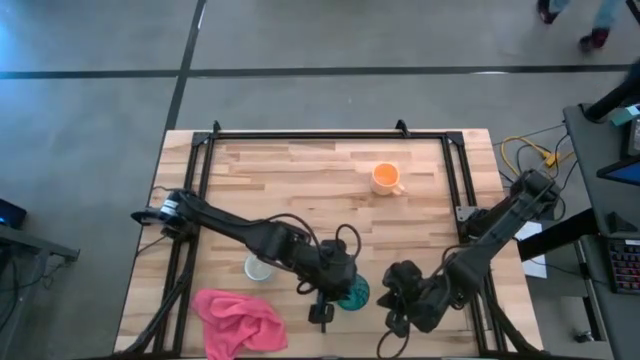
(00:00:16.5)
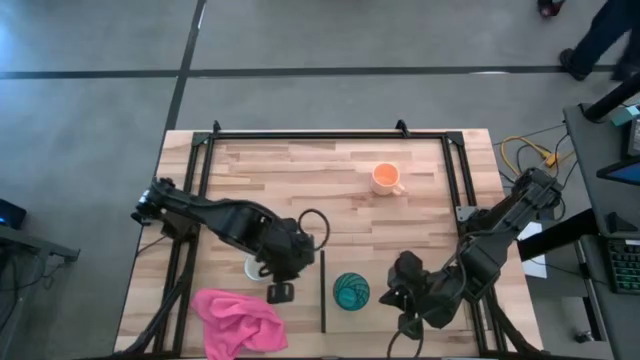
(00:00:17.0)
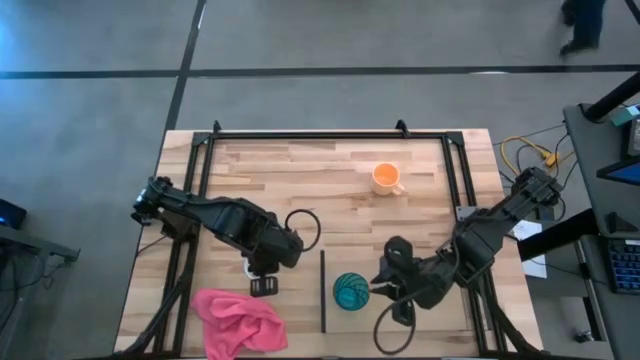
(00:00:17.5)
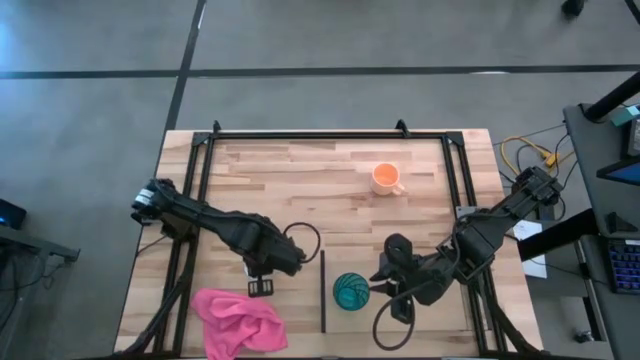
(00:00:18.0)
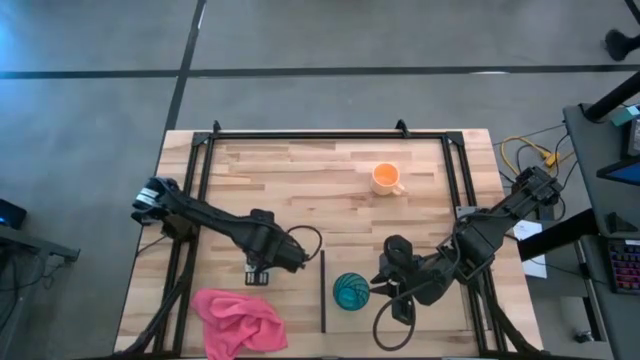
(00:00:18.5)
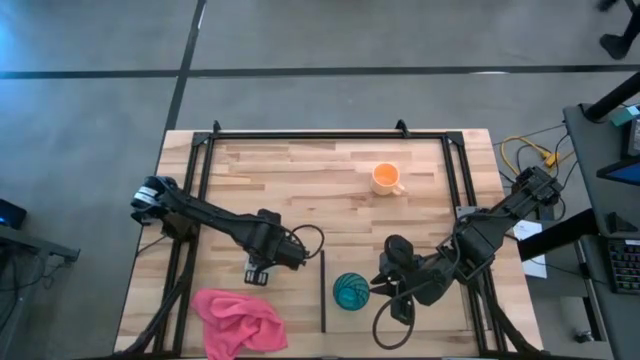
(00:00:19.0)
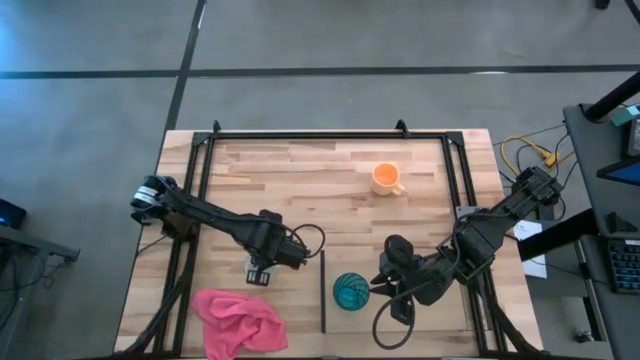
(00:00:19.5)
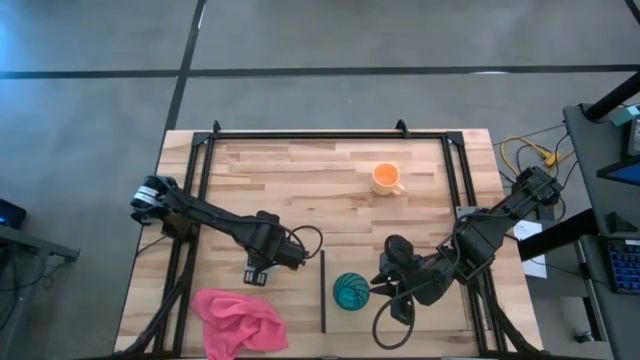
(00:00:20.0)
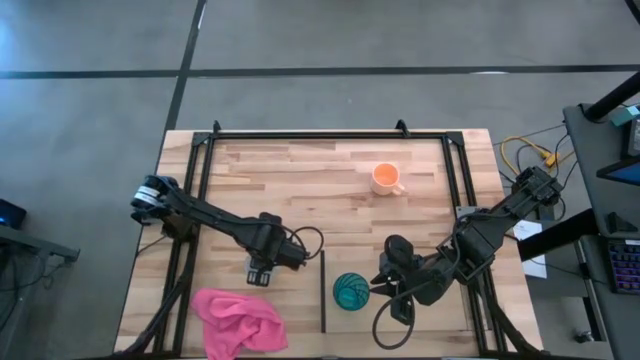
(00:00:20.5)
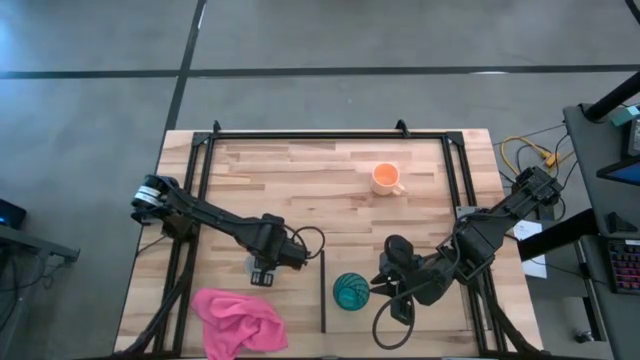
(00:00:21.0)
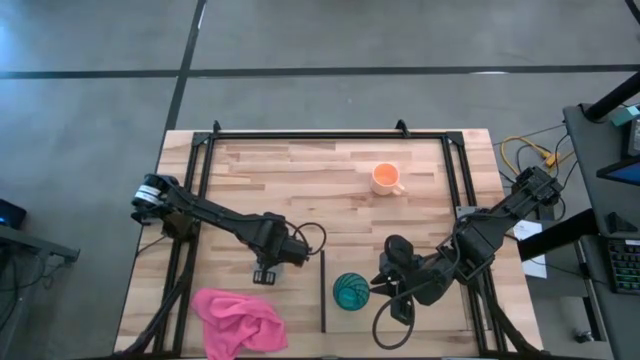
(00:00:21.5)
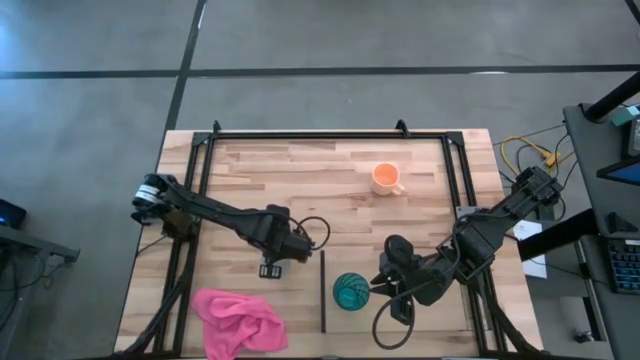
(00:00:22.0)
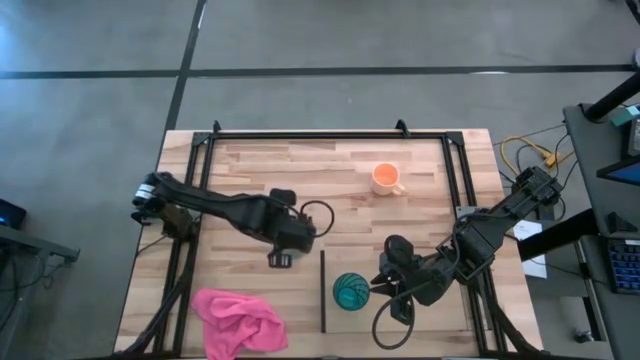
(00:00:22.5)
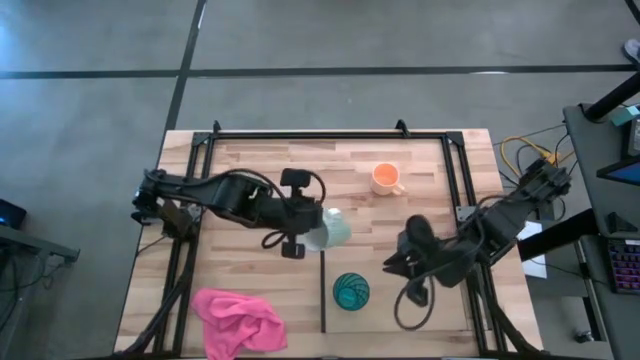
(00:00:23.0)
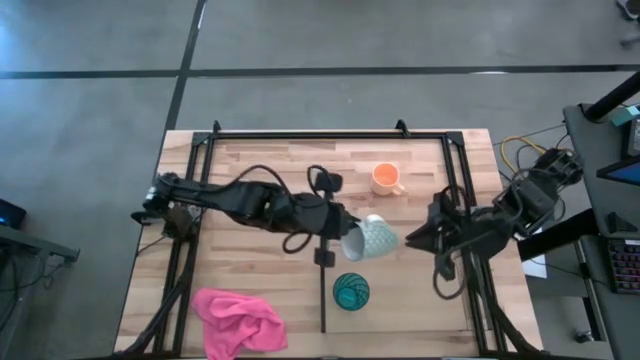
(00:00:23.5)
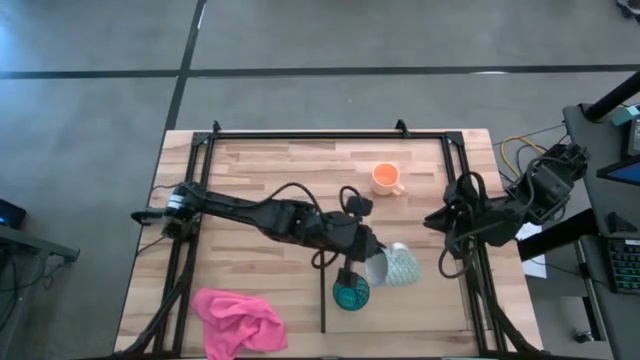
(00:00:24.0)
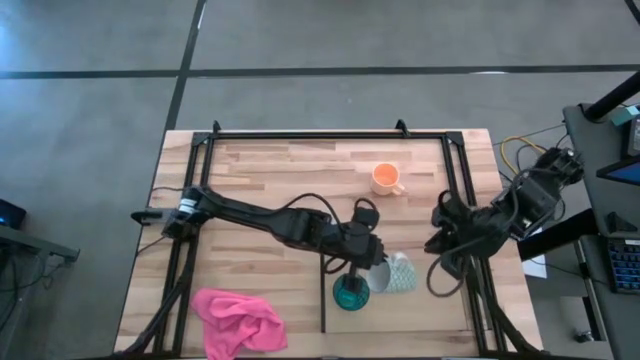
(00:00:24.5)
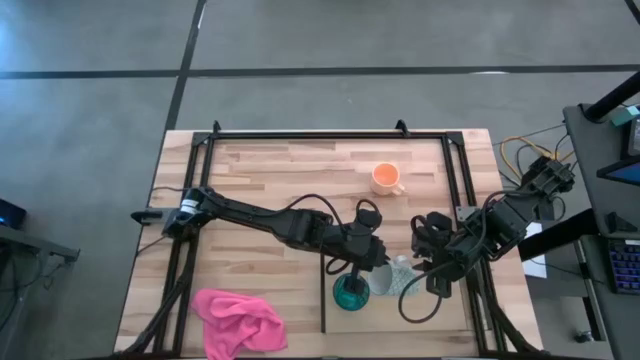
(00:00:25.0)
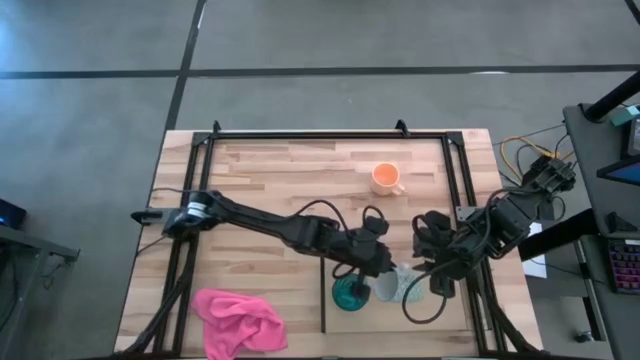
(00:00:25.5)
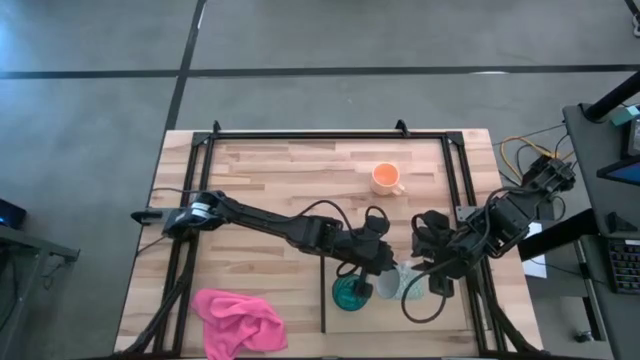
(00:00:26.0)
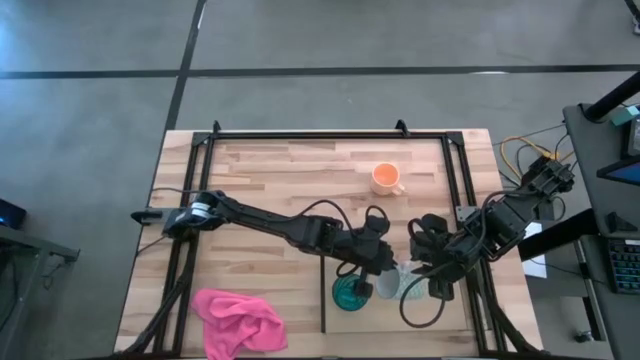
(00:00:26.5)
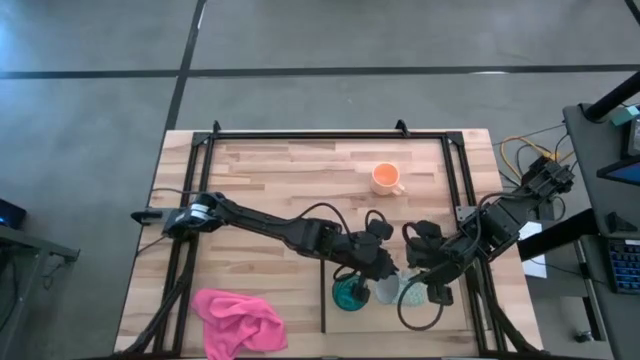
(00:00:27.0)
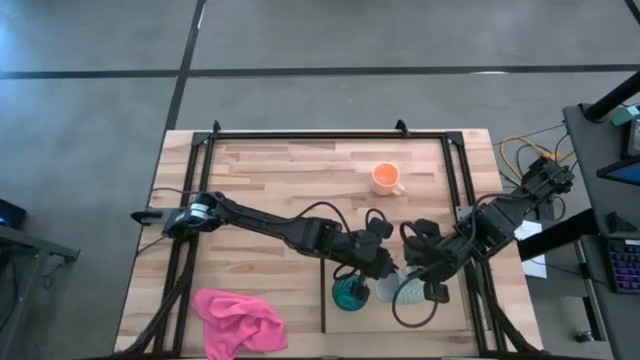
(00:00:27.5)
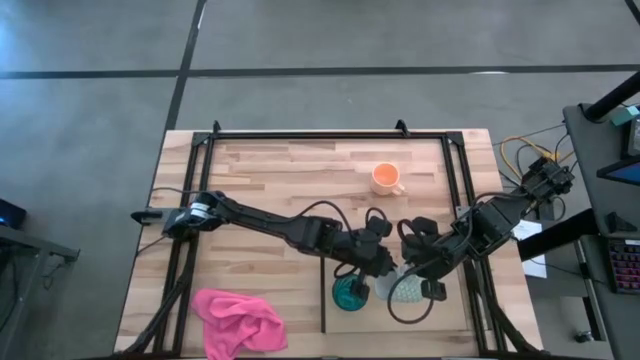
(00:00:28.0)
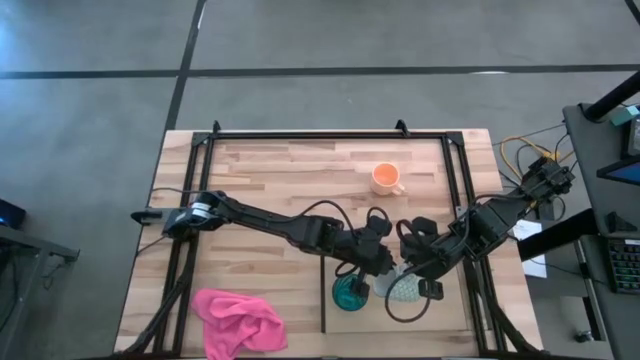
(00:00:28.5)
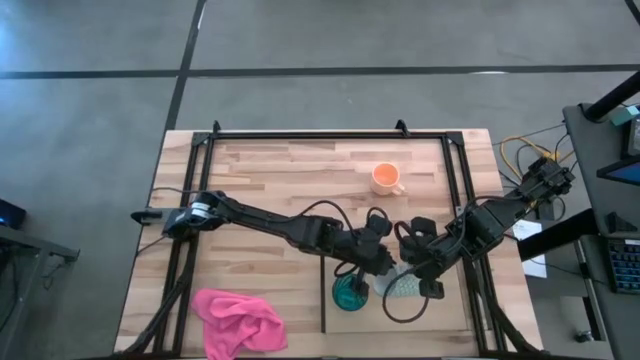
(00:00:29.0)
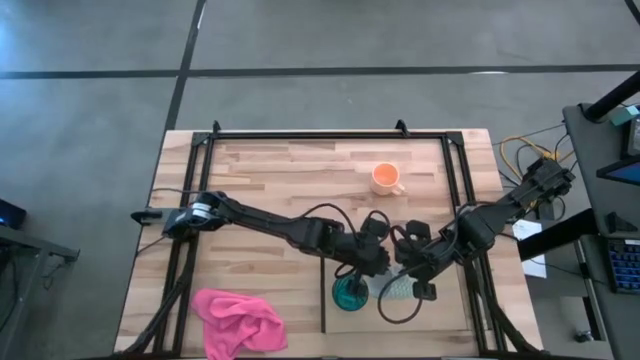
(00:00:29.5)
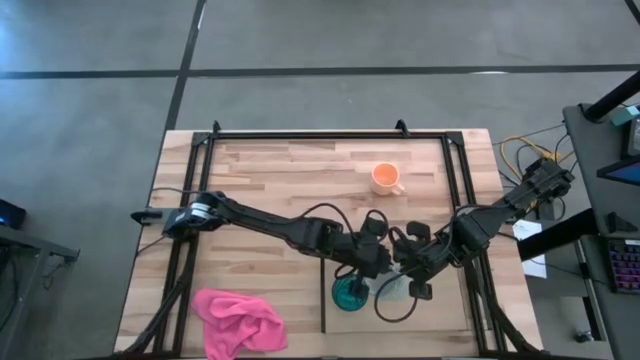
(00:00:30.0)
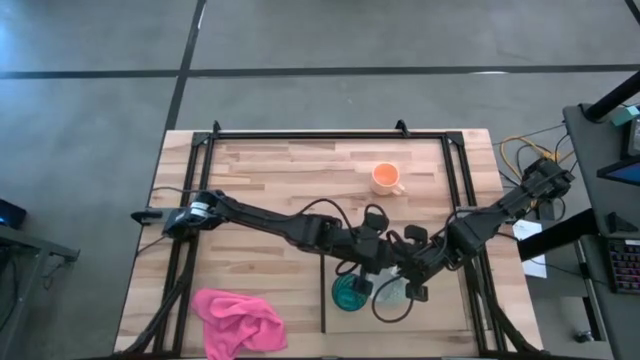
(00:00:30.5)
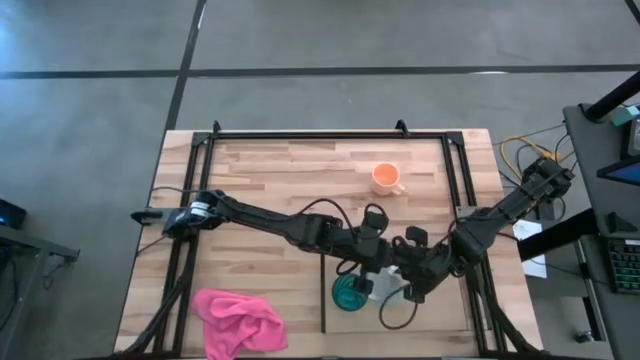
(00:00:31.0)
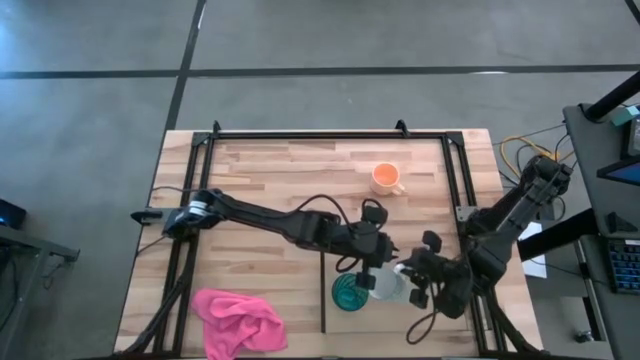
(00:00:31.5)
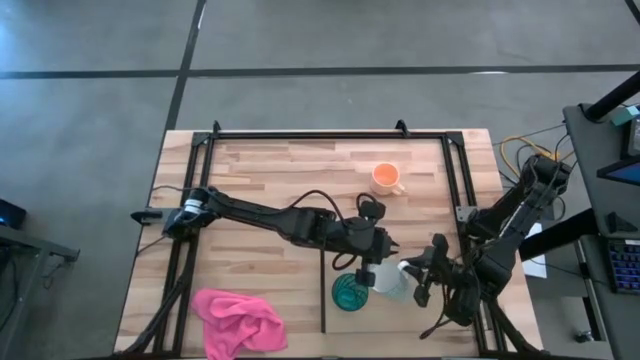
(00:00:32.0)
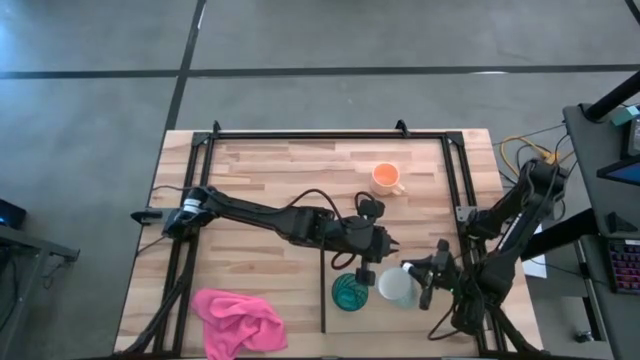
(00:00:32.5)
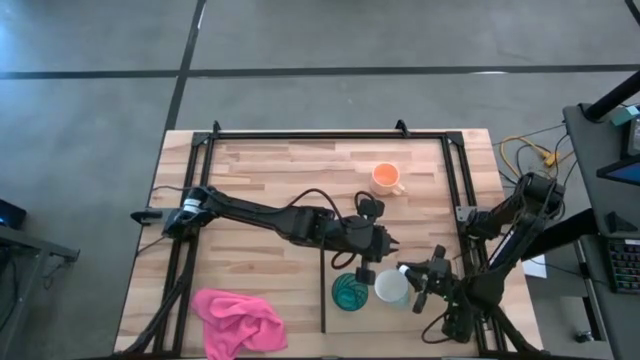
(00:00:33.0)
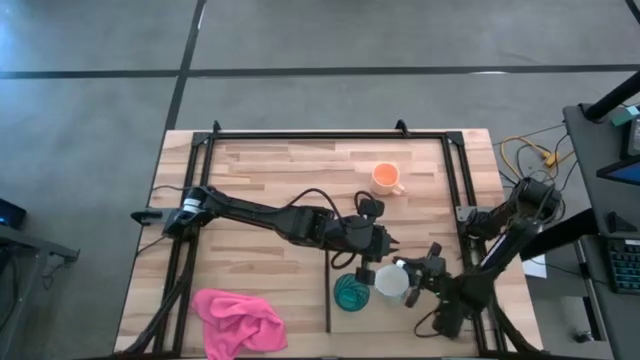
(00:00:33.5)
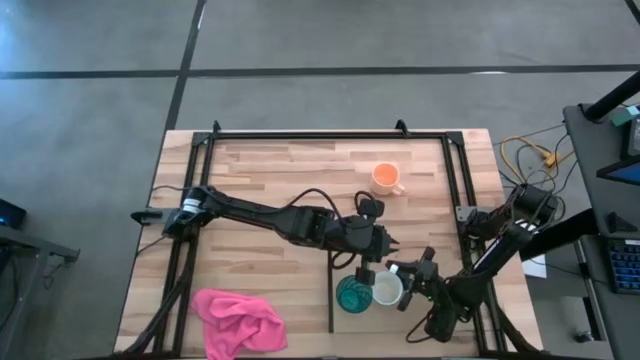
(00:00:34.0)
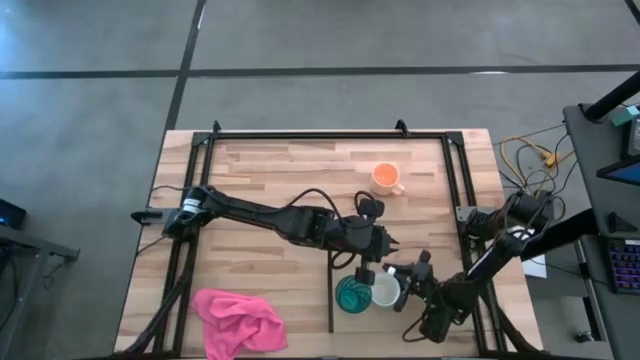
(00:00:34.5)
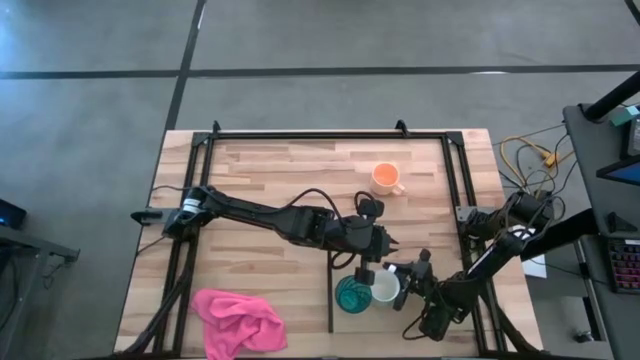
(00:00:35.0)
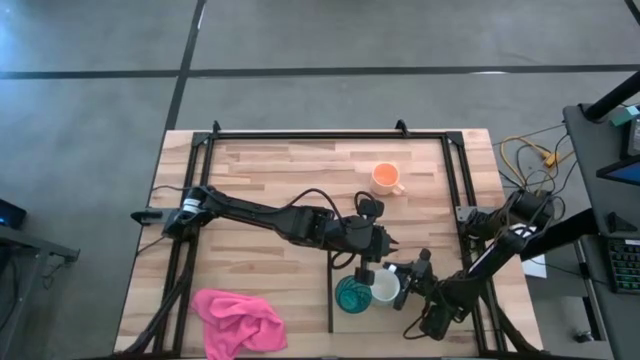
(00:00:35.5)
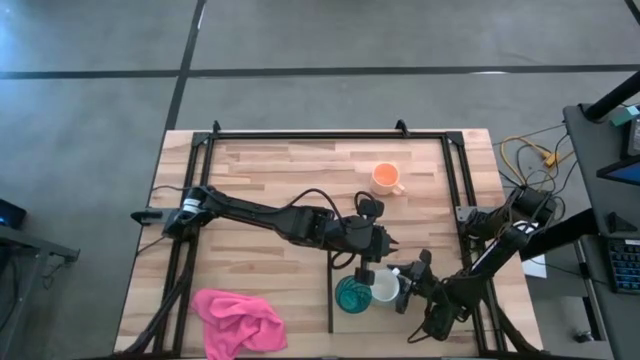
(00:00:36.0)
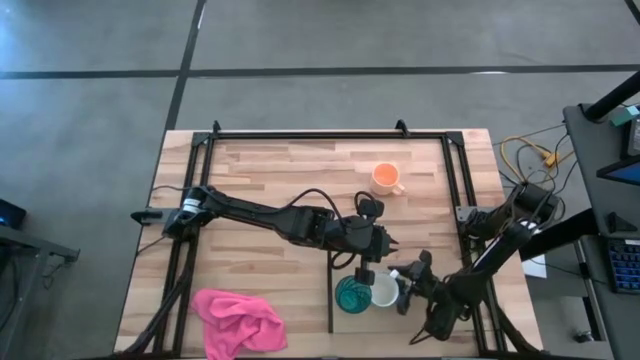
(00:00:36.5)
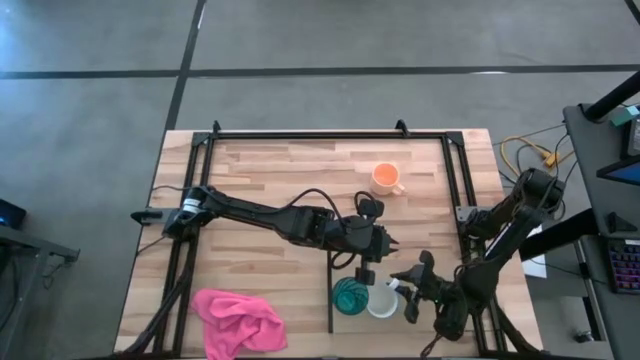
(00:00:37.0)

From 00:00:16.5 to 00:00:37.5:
Task: Stack small to large cups/mugs on shelf
Put the green patterned mug on the shelf
